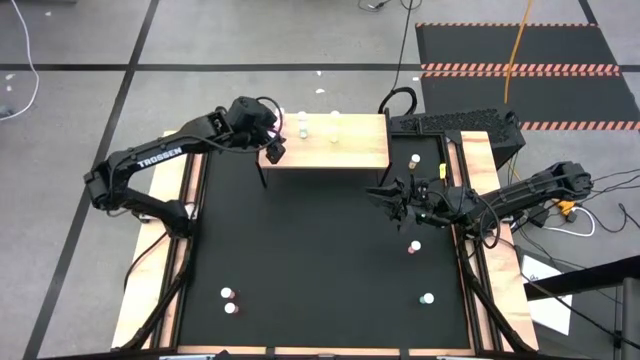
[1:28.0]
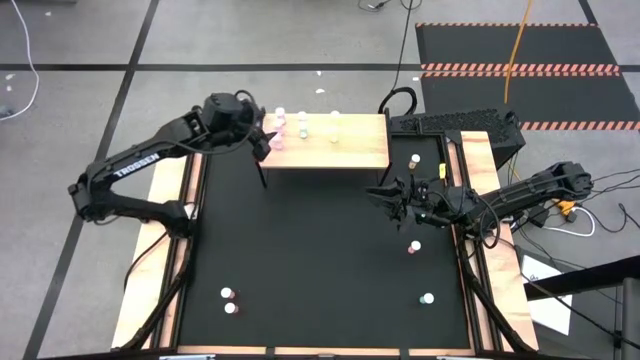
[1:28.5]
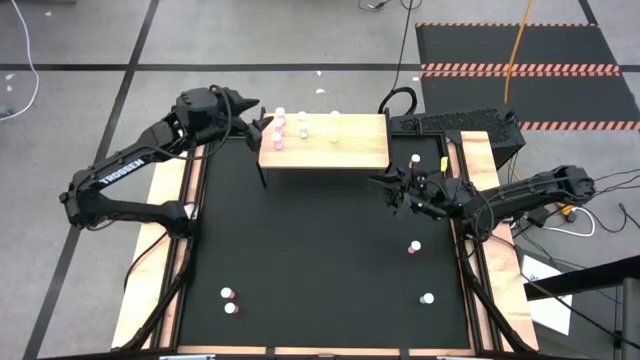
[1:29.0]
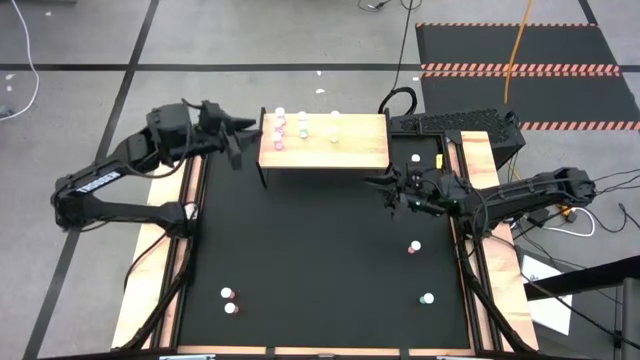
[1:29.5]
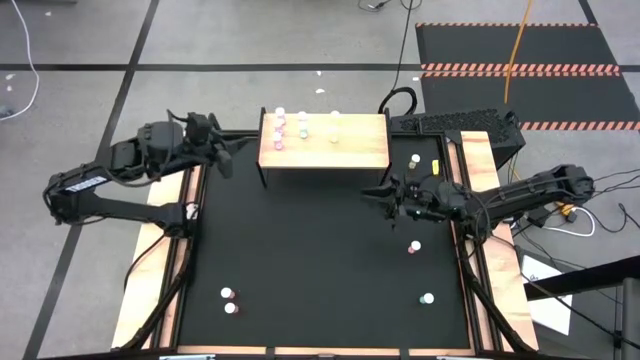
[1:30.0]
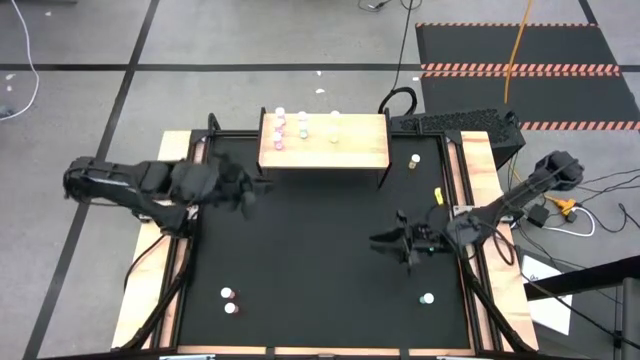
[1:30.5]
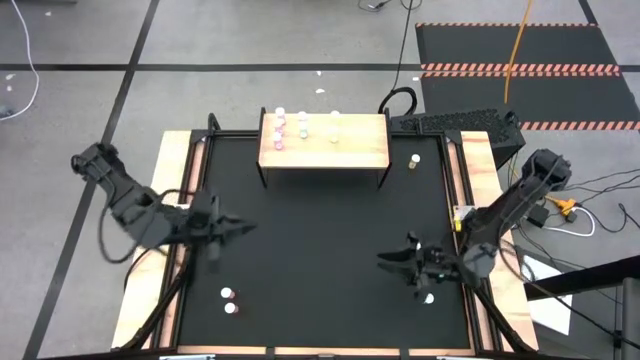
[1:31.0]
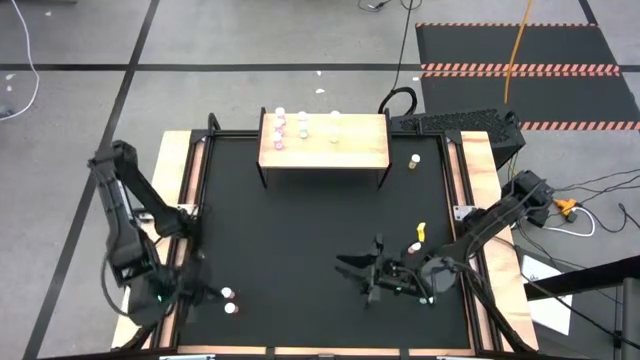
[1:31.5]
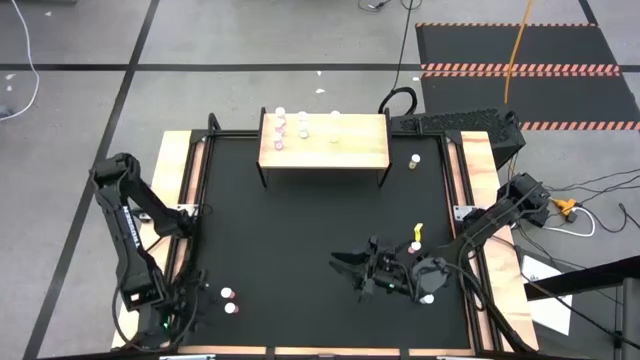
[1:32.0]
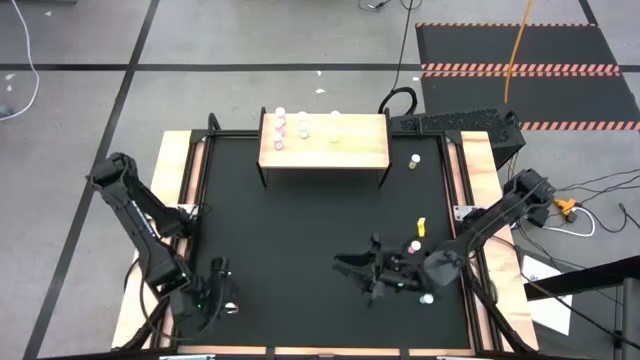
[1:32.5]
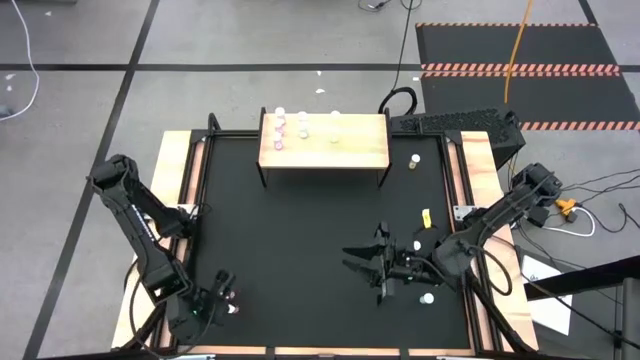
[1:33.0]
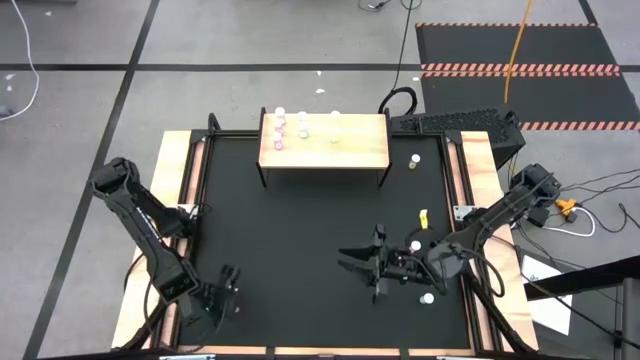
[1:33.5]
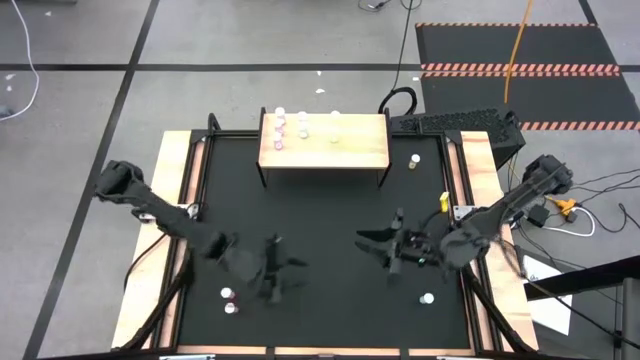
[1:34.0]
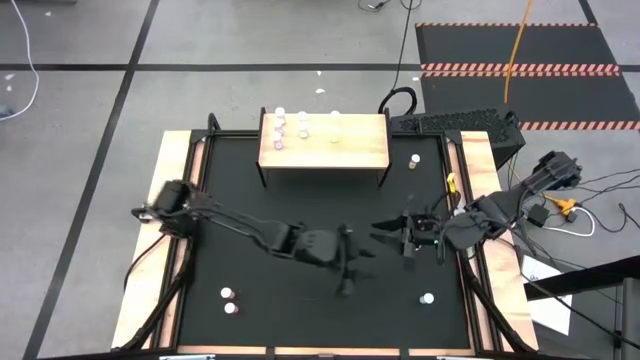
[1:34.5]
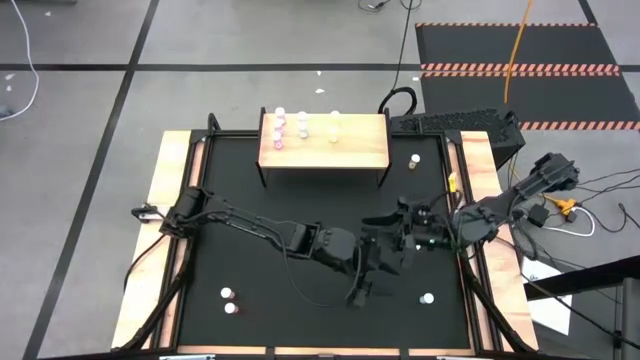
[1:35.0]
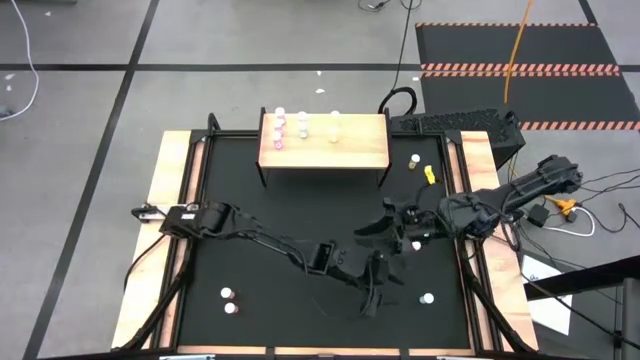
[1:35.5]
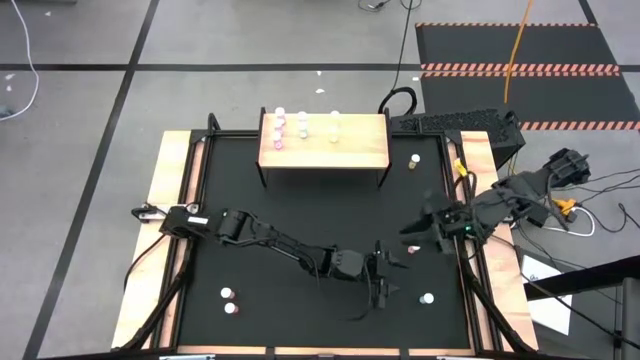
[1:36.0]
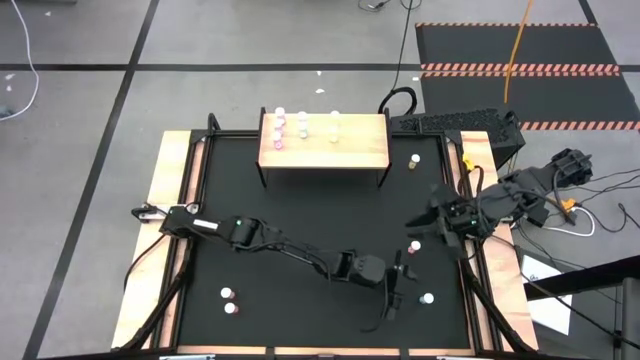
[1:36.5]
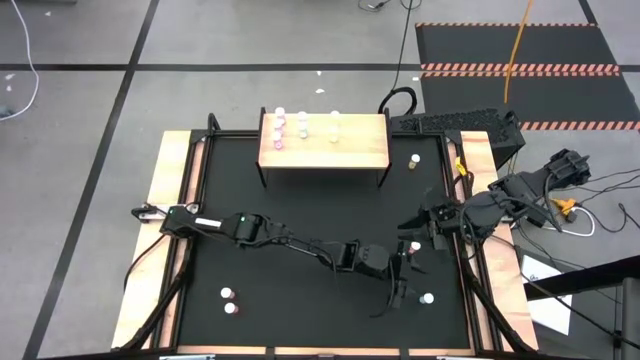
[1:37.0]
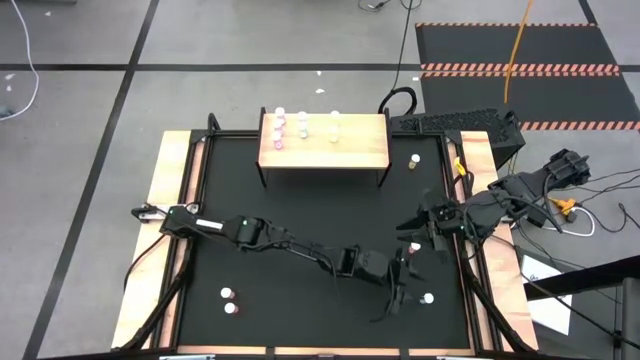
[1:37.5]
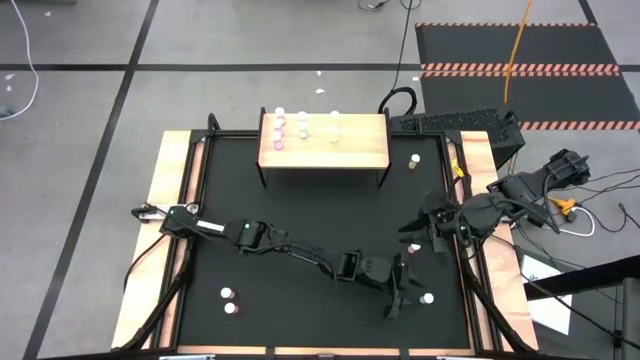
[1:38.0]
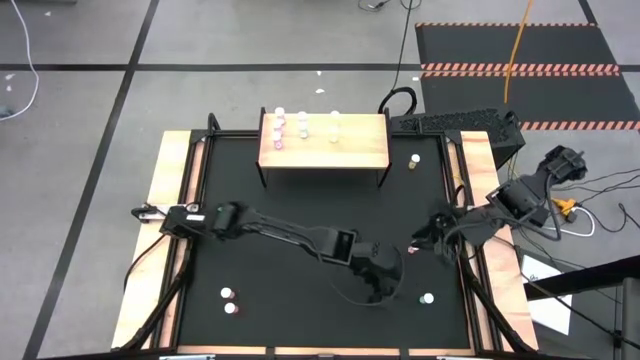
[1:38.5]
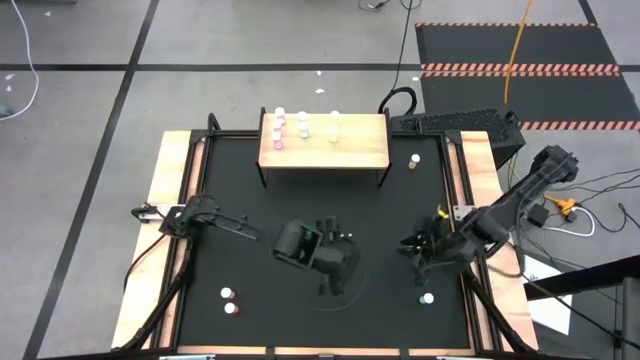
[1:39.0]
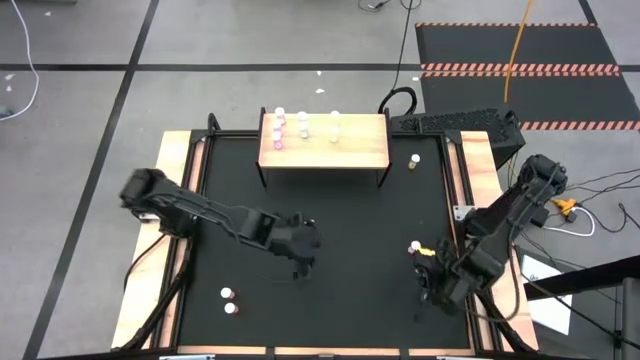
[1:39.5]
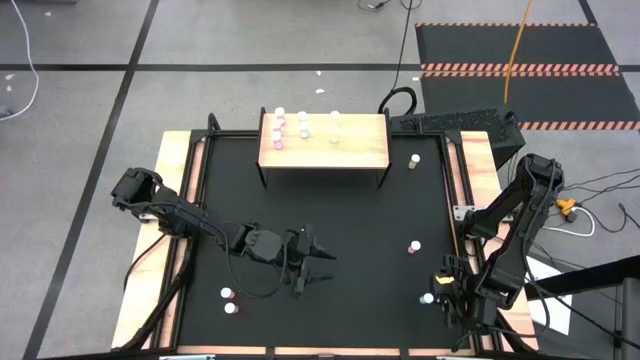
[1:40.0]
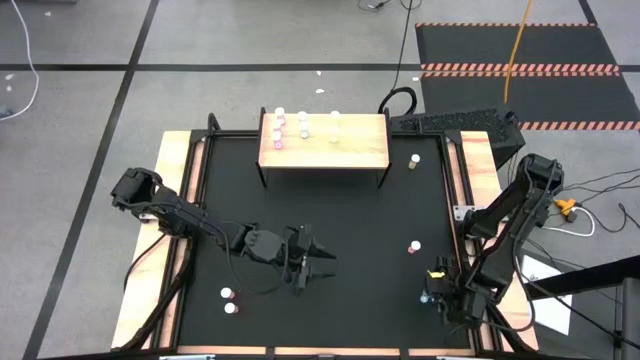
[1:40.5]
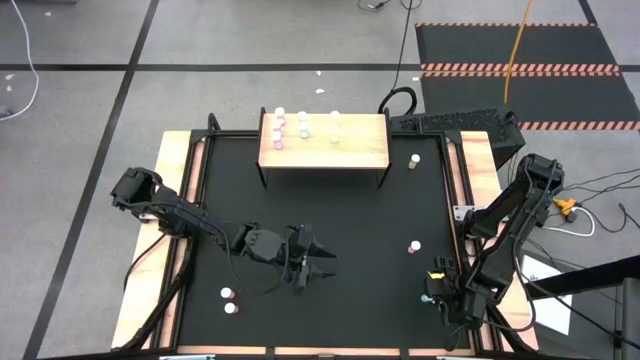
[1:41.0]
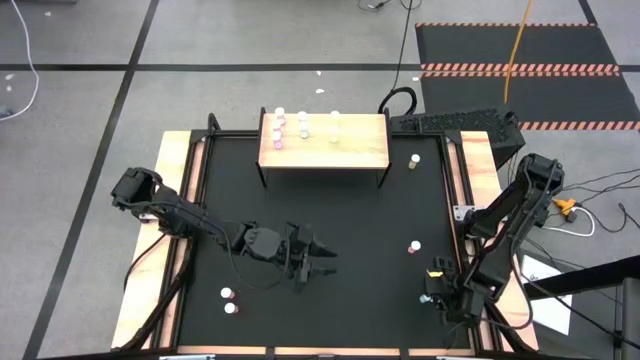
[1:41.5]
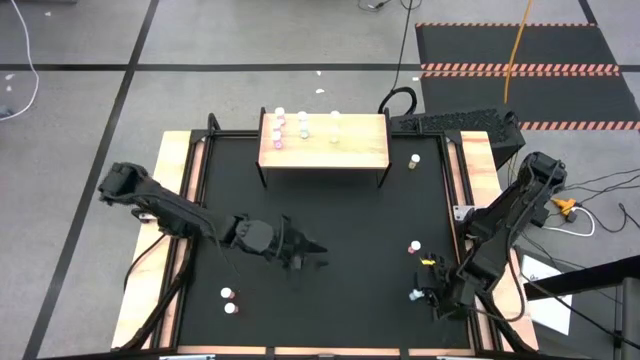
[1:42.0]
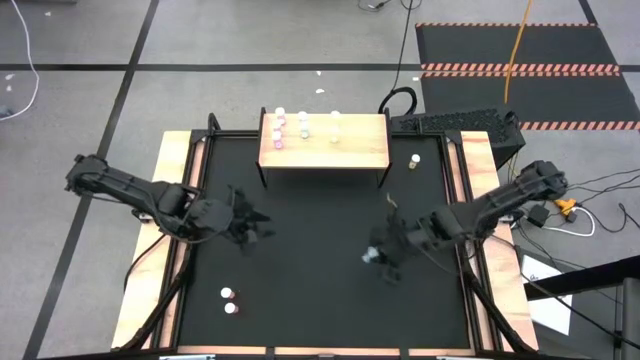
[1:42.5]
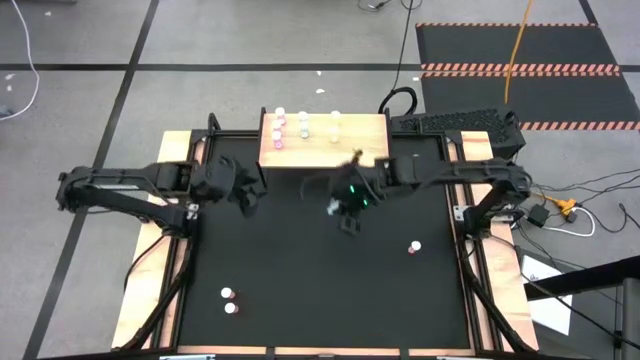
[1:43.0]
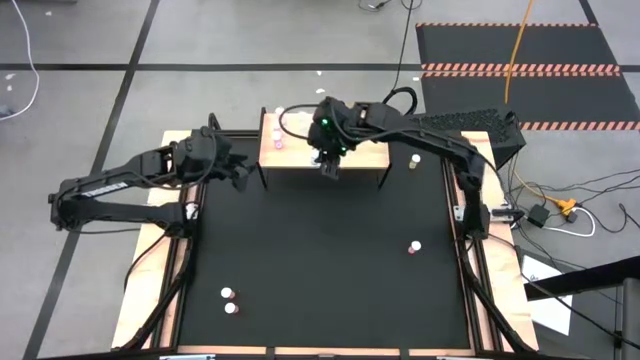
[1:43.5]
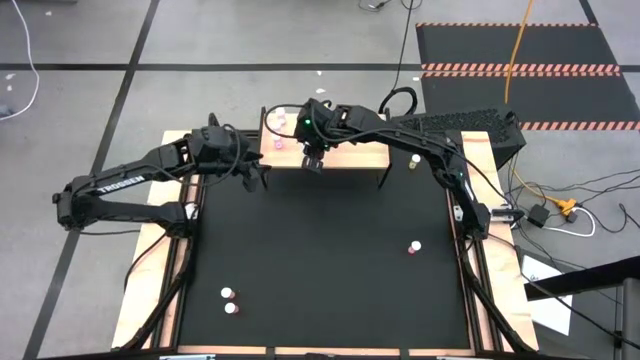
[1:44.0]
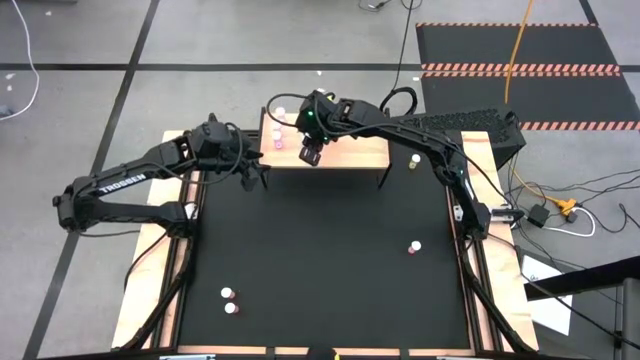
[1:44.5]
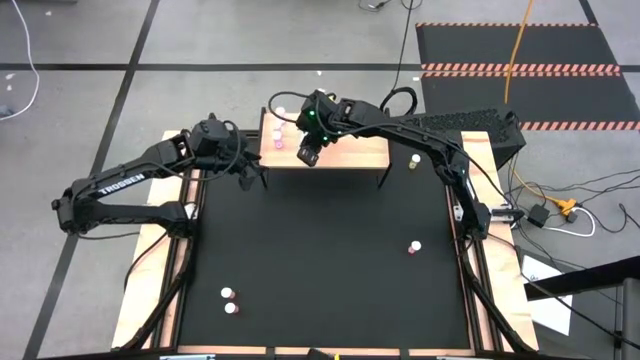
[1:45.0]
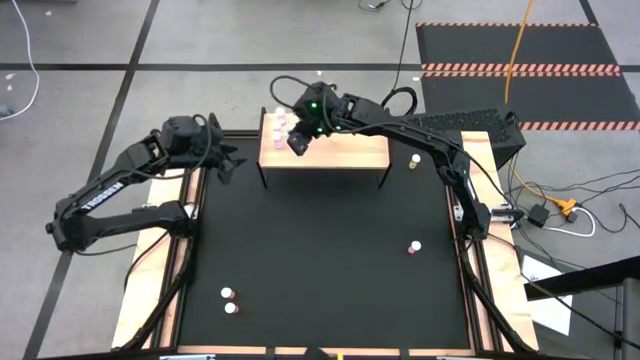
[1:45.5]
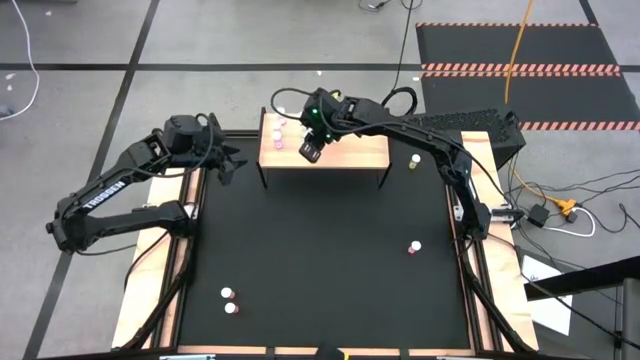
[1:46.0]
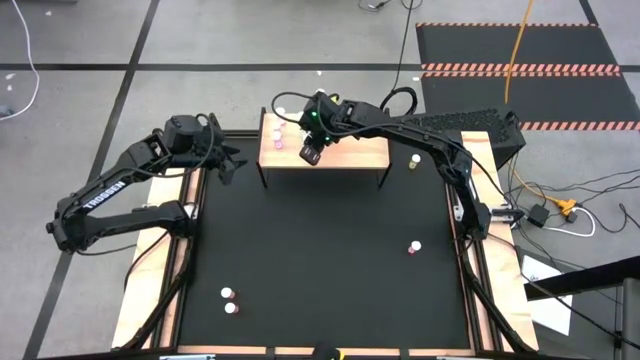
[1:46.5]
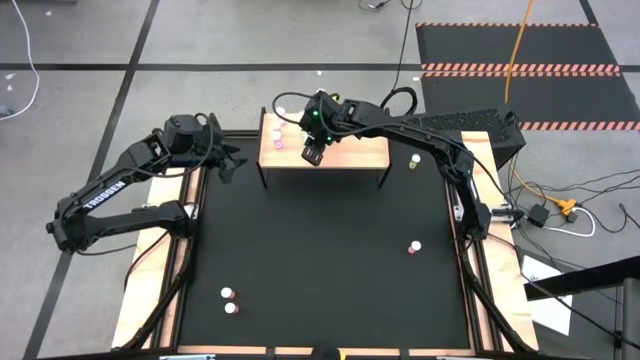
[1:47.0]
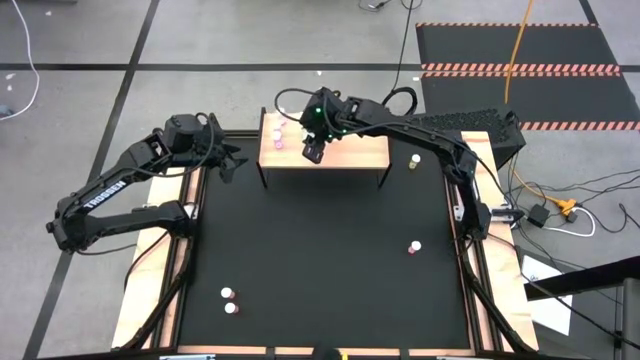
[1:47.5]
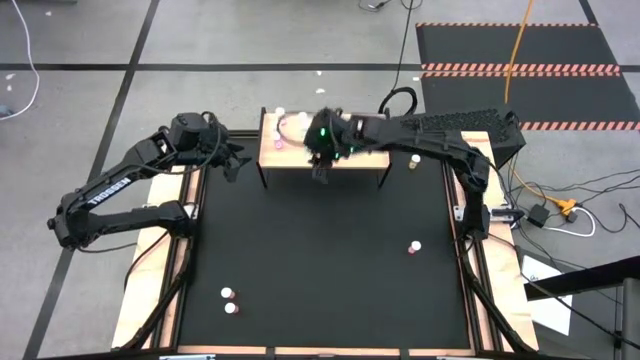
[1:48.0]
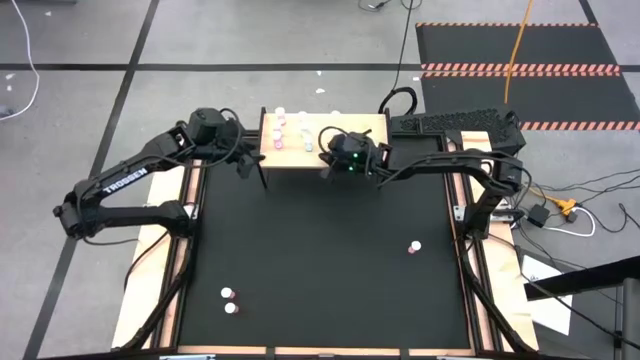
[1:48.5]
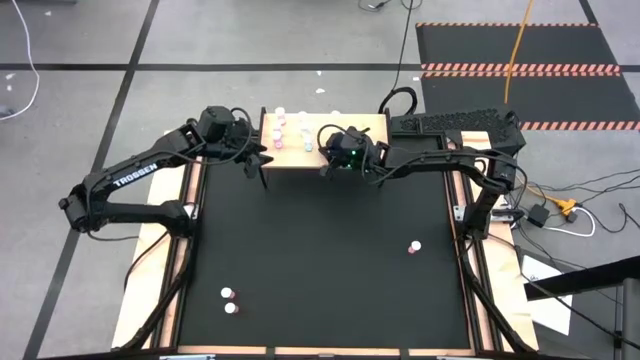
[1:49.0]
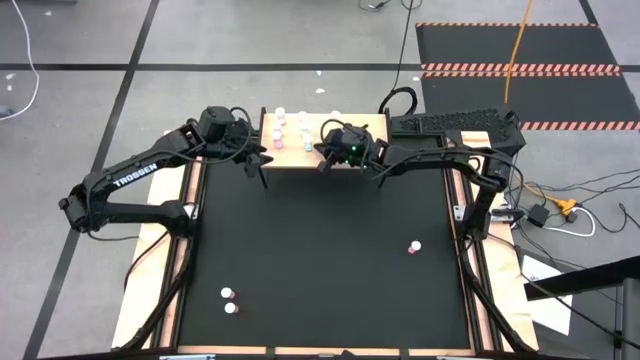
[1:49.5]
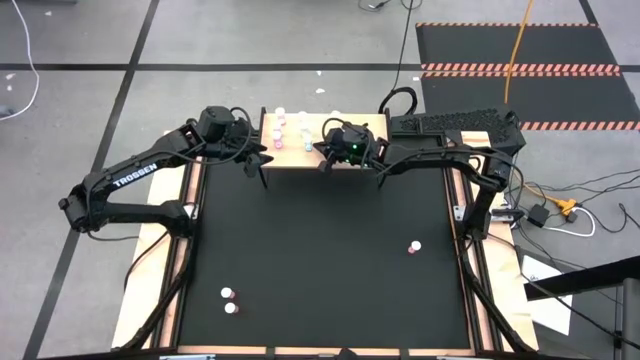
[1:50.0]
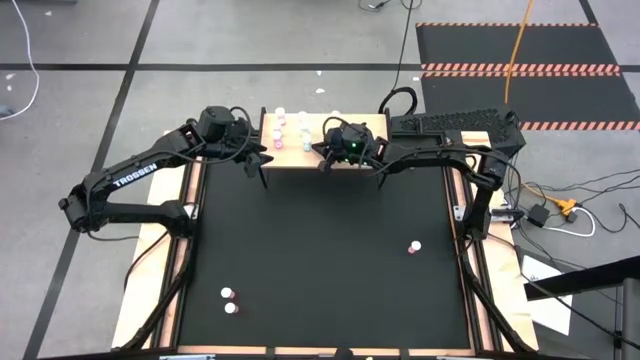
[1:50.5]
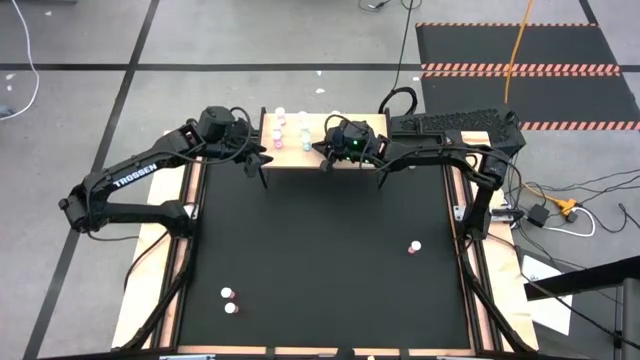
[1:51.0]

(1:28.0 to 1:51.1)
Task: Pick and place medicine bottles onto shelf by color
Put the blue pill bottle on the shelf aligned with the other blue pill bottles
